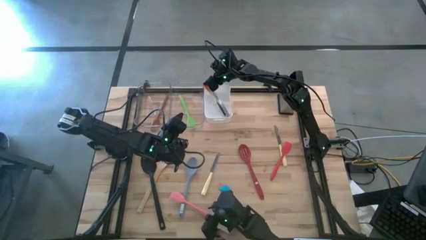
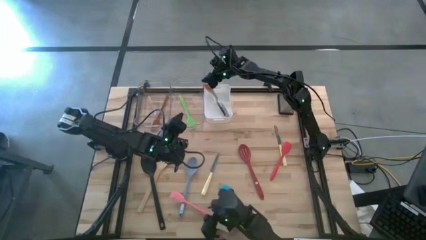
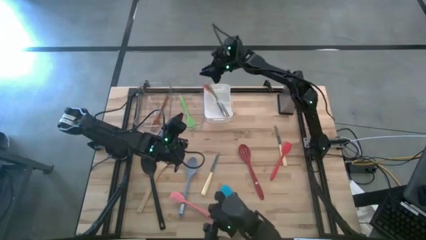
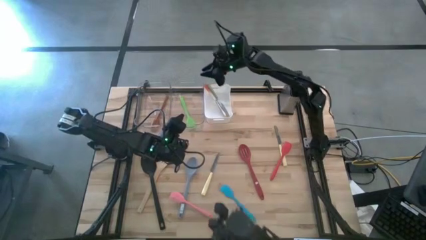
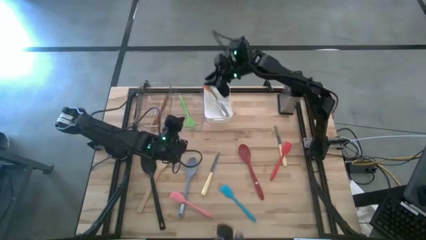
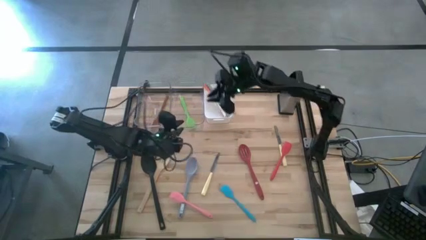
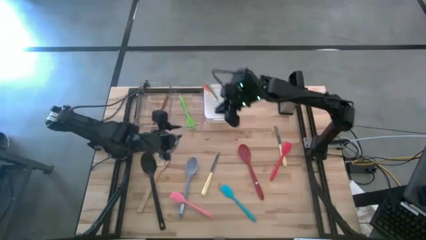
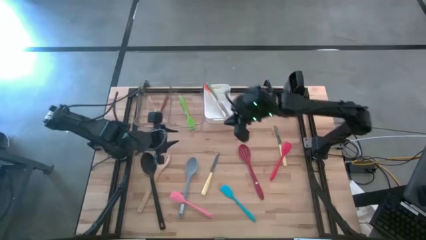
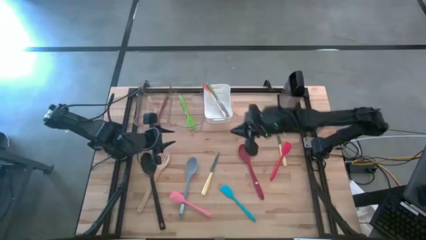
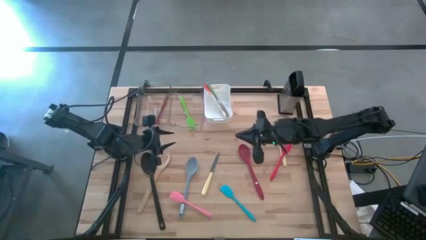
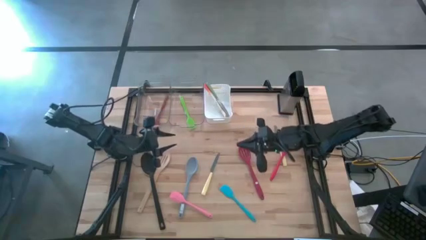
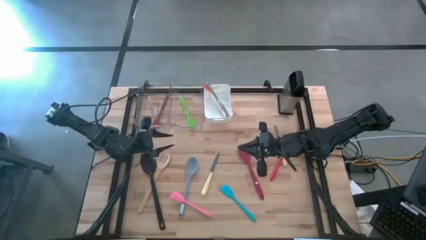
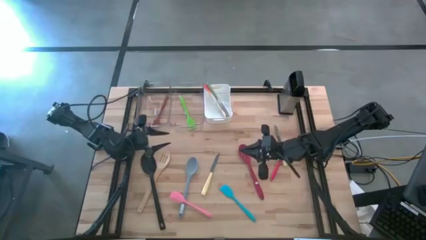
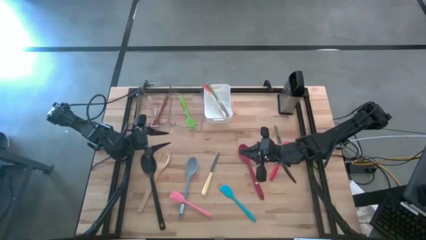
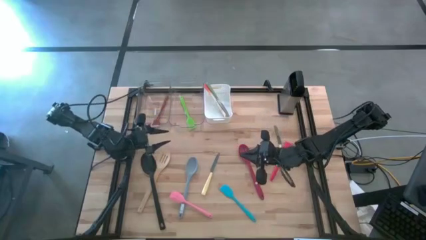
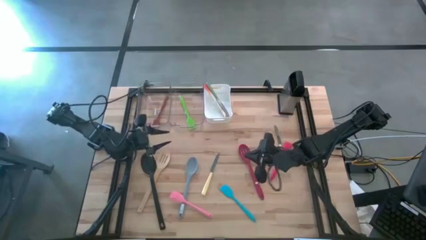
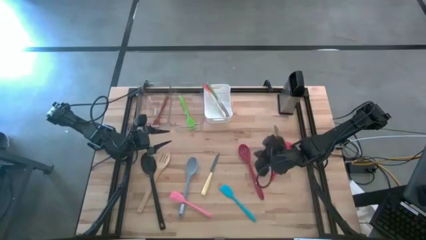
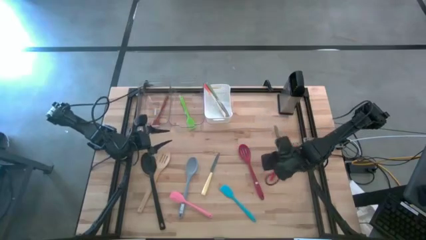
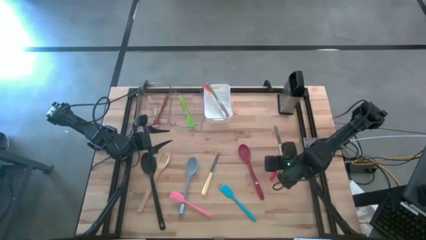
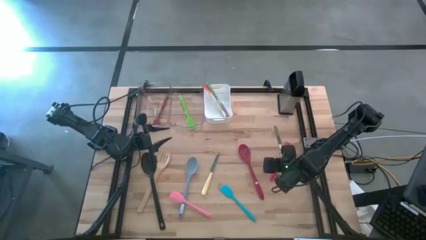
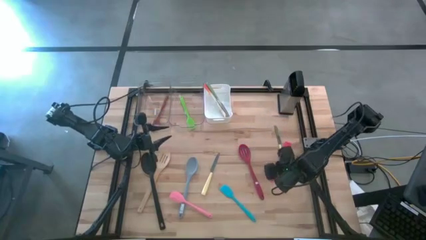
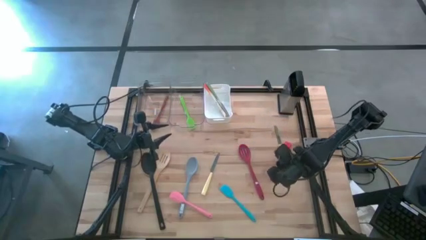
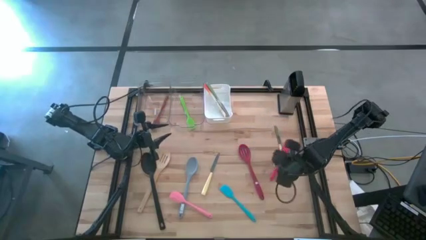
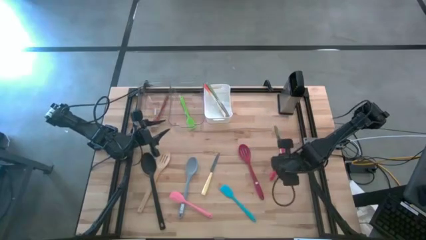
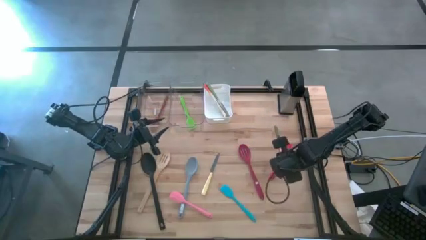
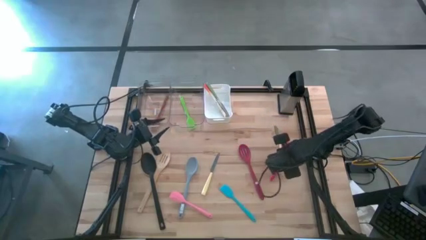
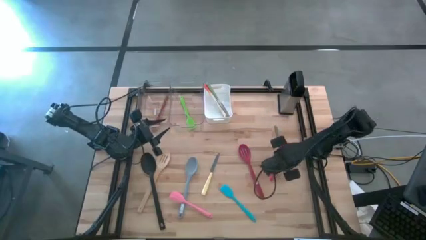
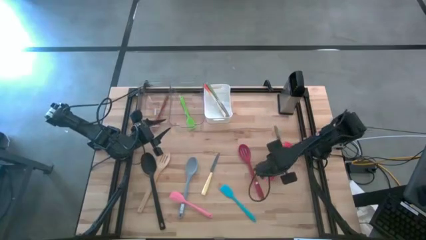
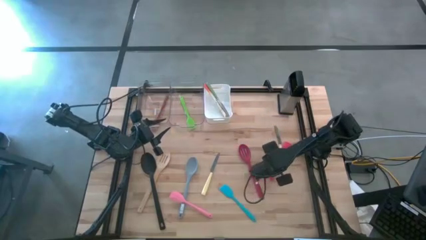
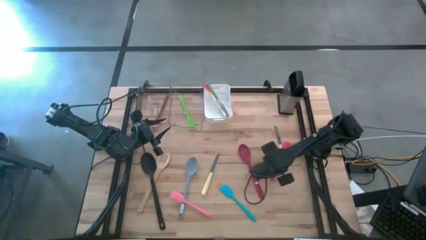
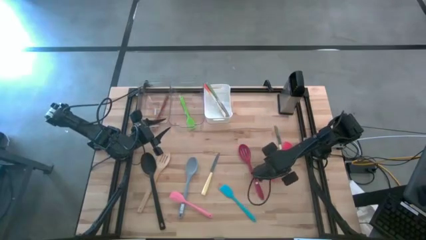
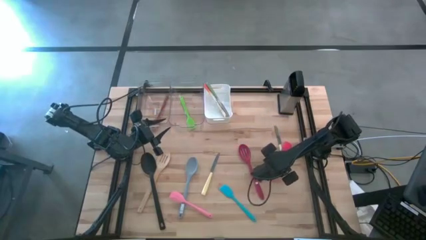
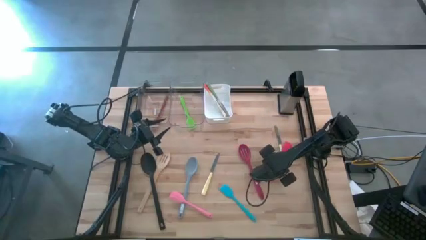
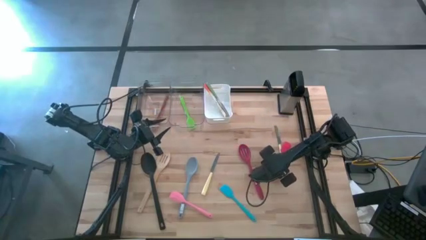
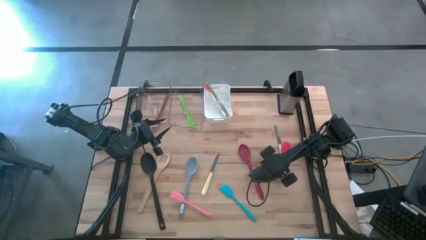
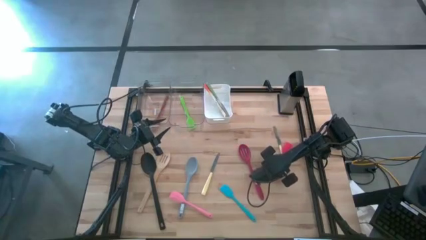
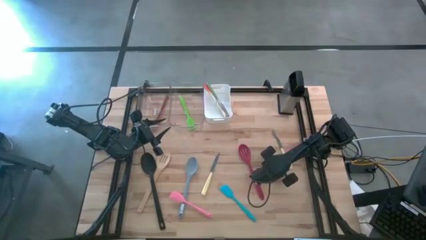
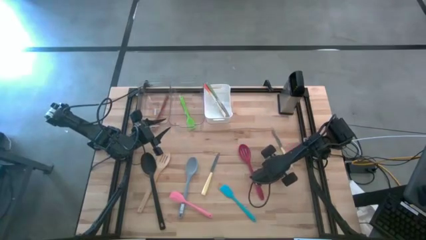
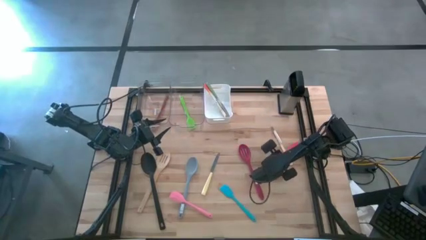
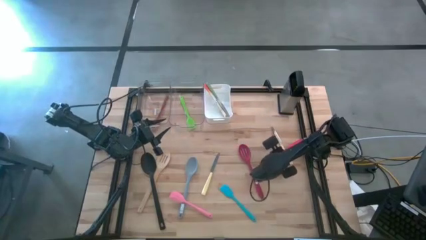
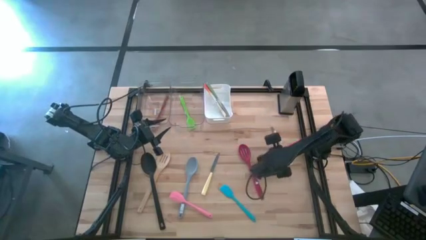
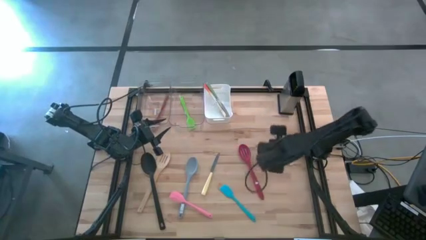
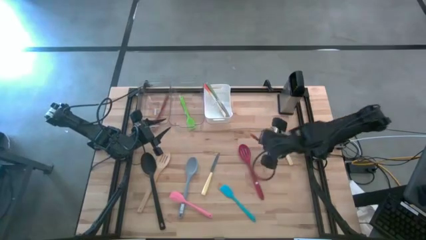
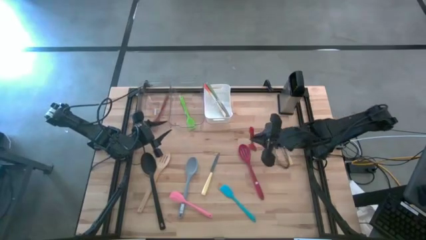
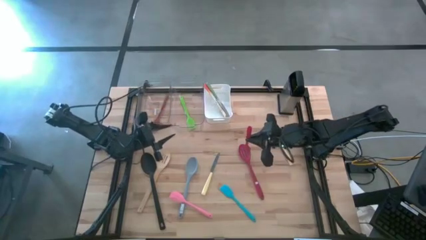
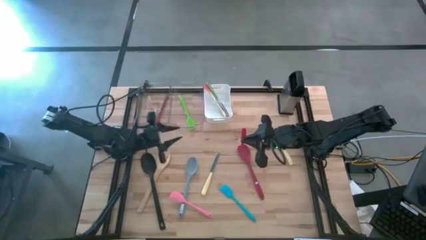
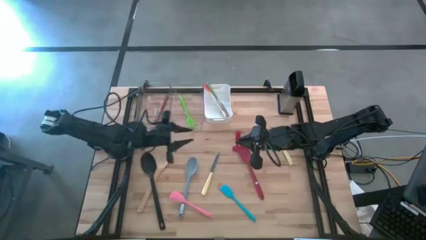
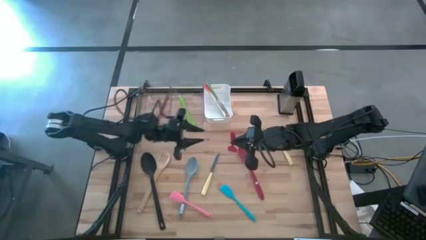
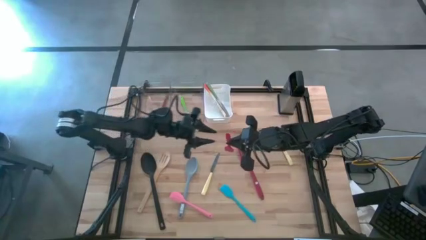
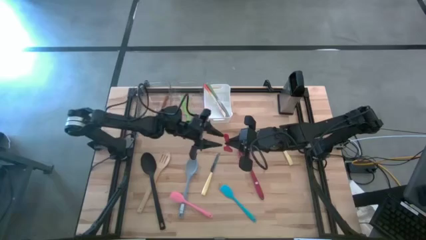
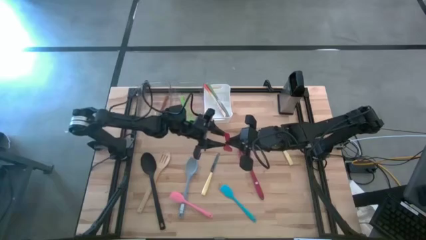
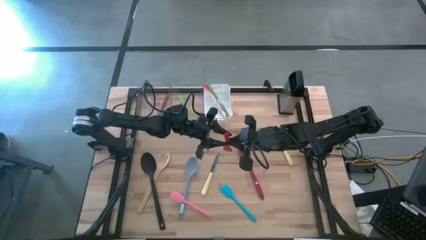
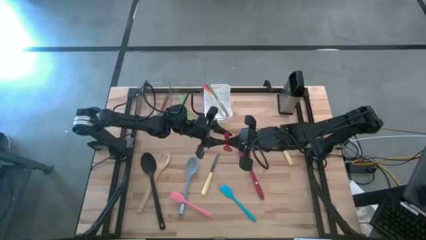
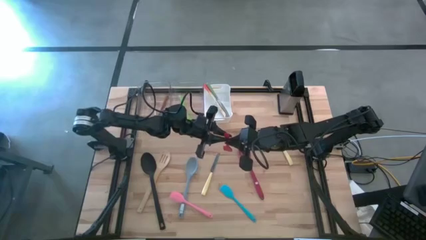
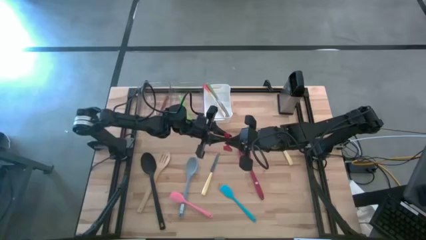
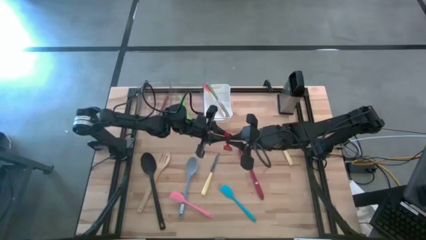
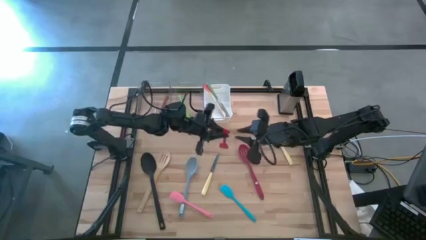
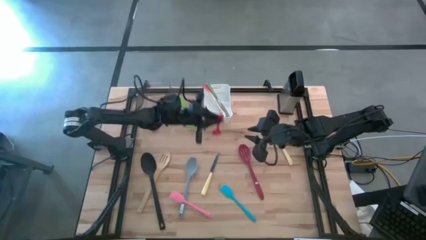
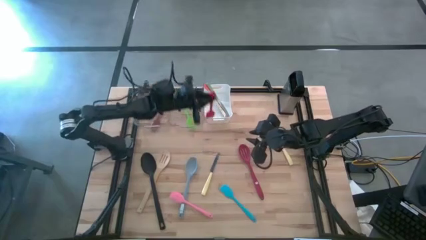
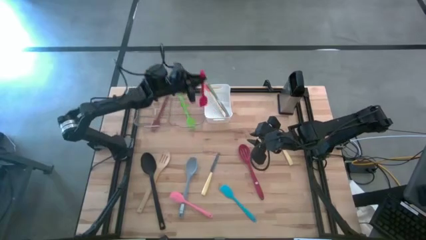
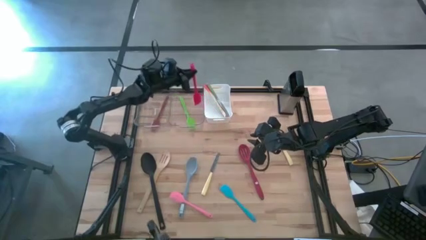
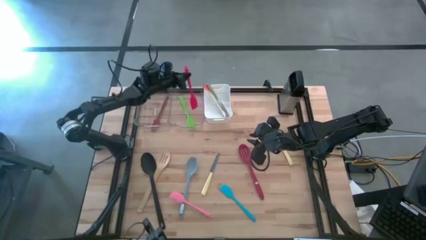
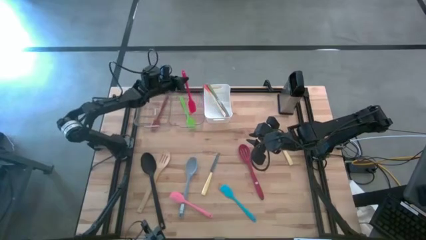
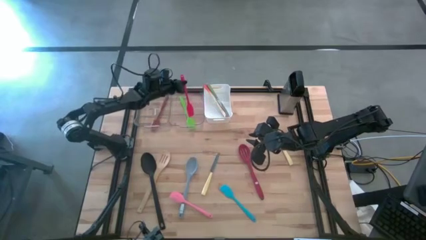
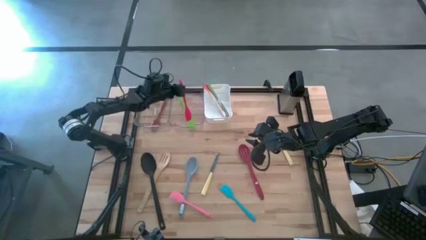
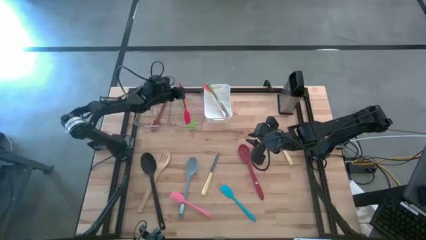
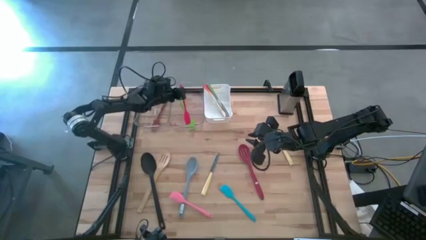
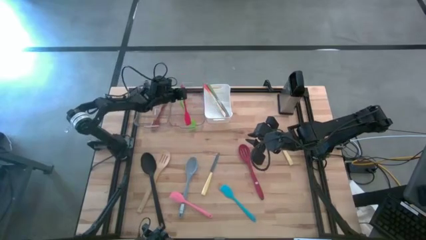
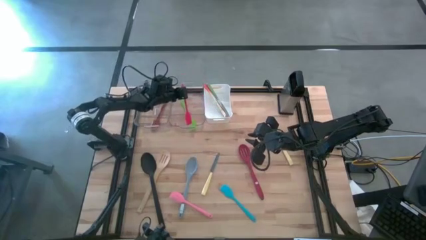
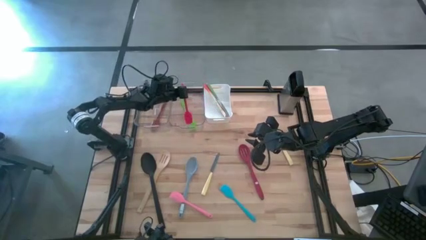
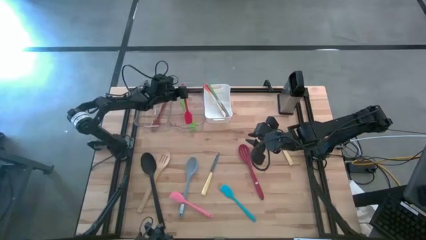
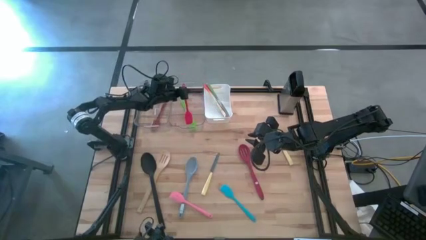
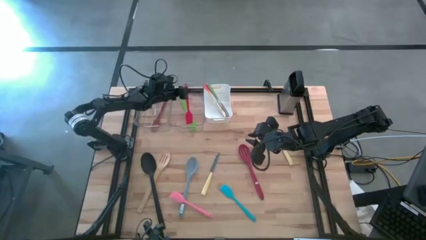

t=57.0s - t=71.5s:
Task: Pick & Place Kitchen Items
Put the red spatula into the right transparent bin

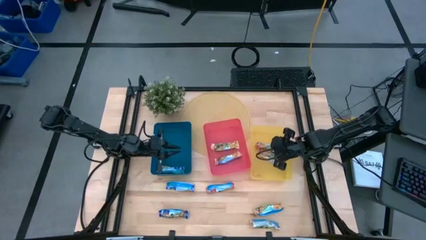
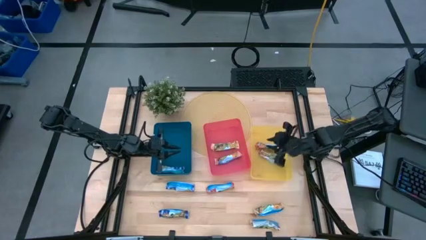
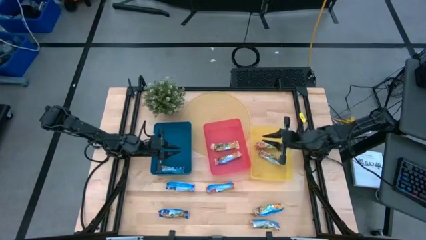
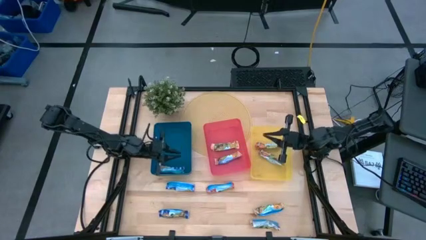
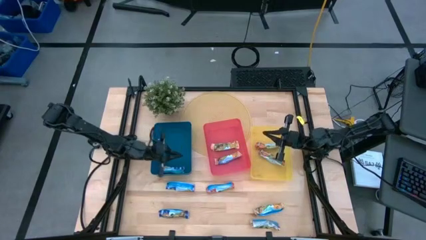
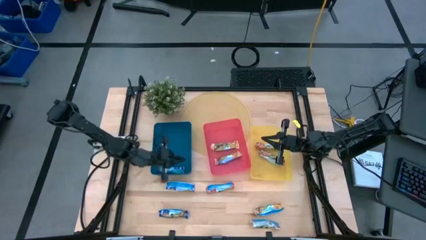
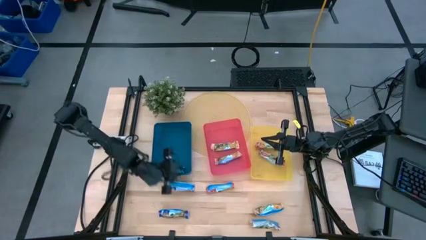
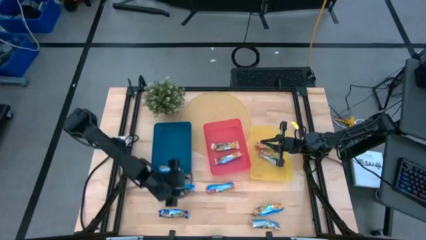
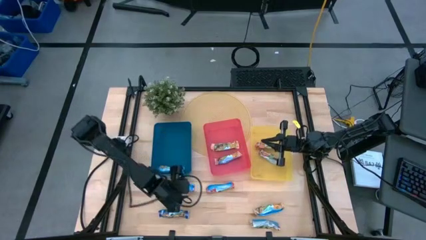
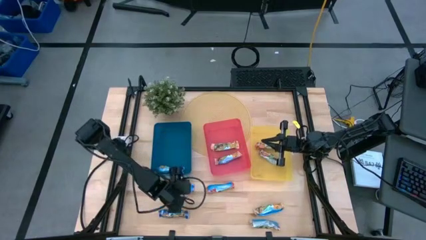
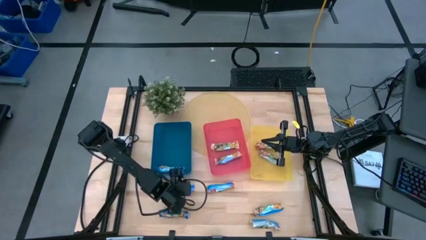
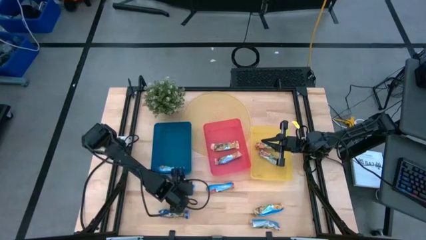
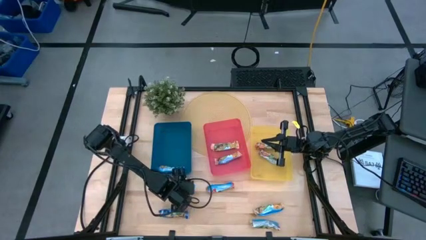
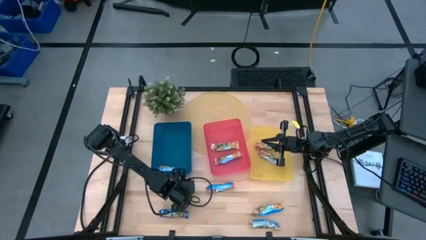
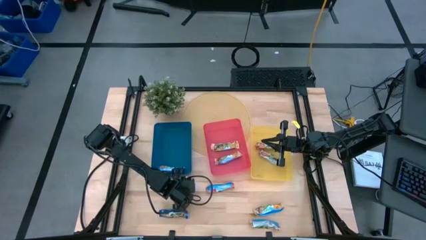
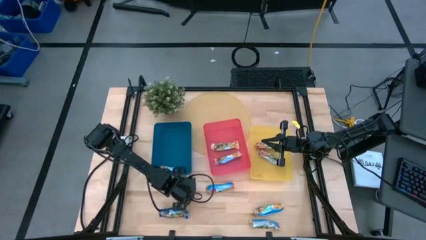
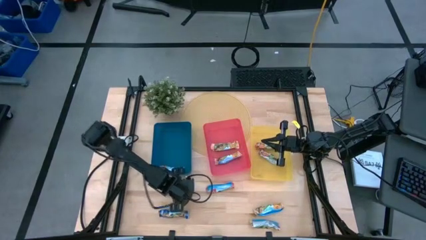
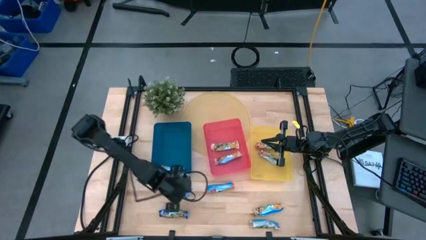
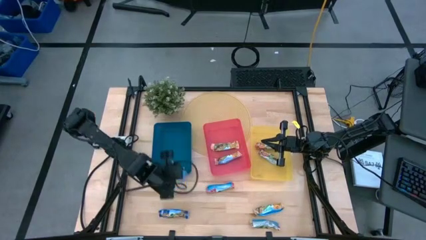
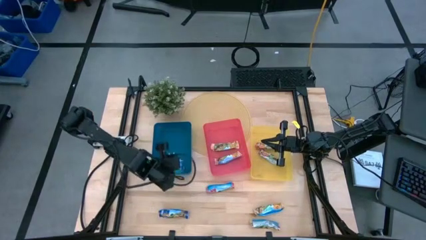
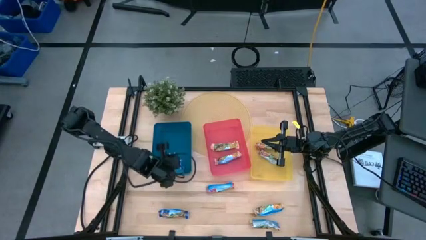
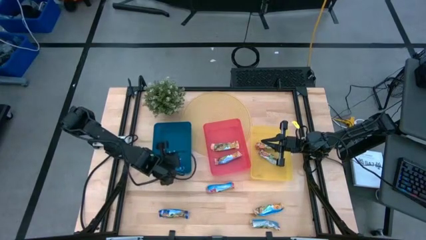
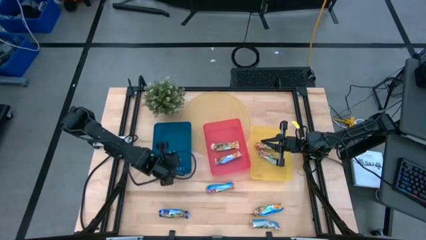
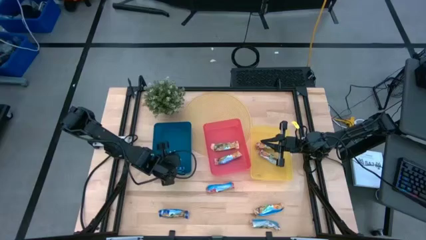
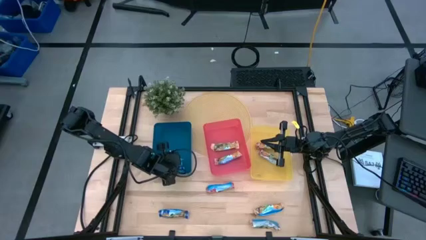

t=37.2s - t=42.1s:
Task: Pick and place Granola Bars by type
Put the blue granola bar into the blue bin
